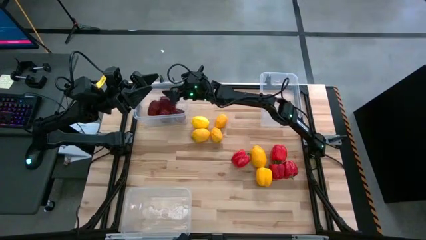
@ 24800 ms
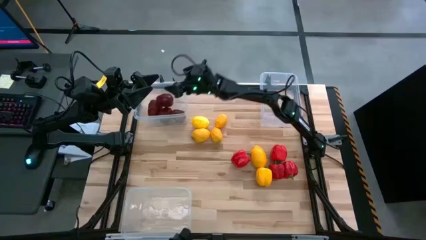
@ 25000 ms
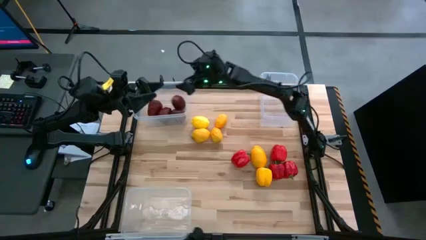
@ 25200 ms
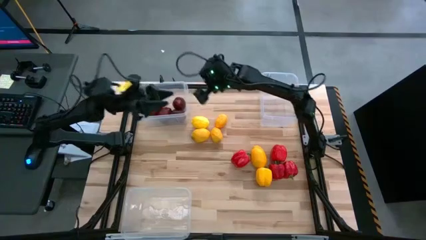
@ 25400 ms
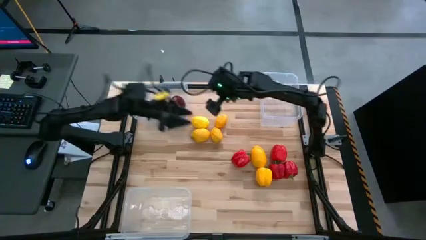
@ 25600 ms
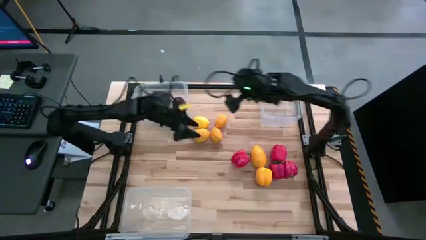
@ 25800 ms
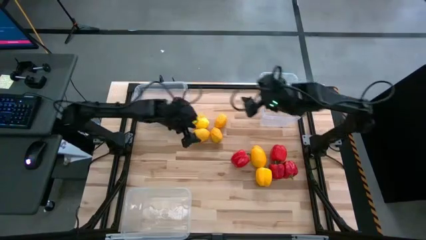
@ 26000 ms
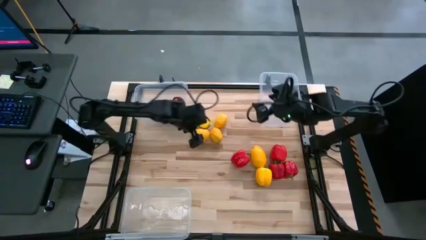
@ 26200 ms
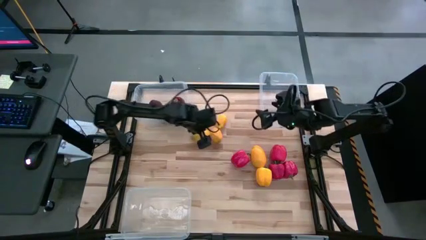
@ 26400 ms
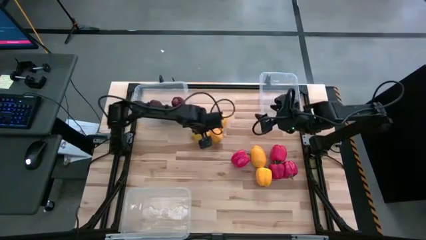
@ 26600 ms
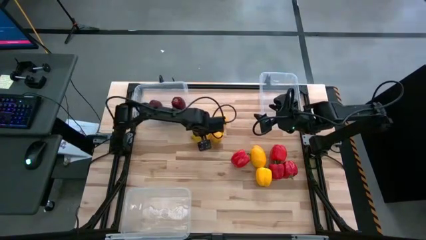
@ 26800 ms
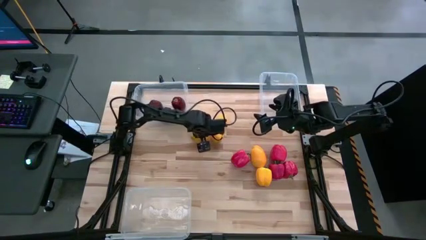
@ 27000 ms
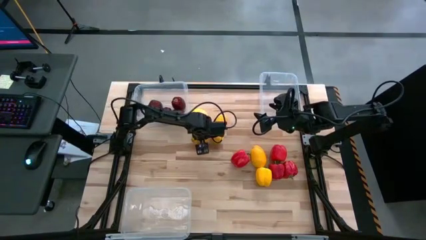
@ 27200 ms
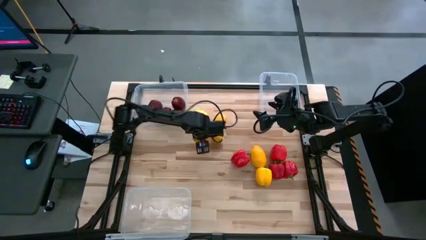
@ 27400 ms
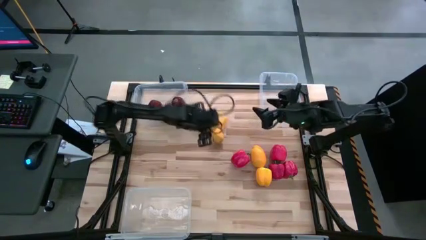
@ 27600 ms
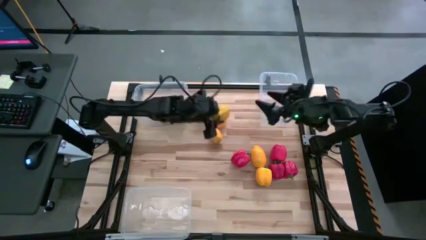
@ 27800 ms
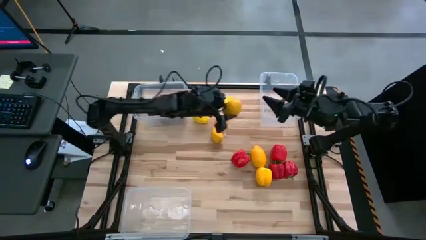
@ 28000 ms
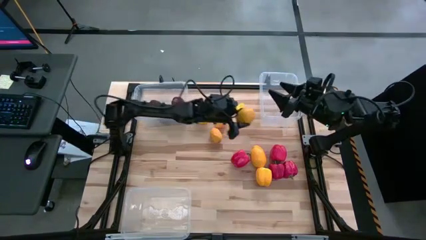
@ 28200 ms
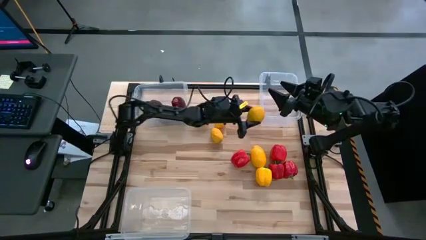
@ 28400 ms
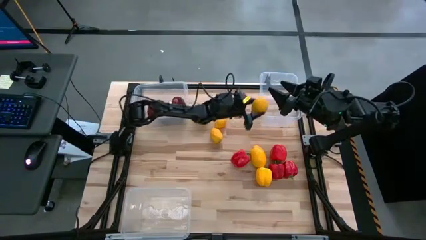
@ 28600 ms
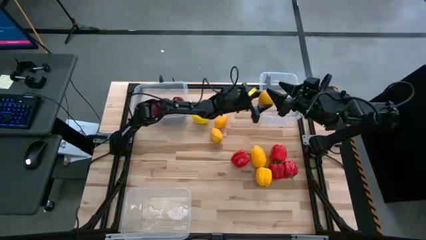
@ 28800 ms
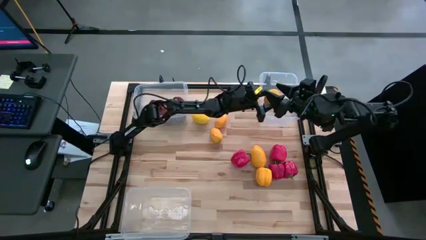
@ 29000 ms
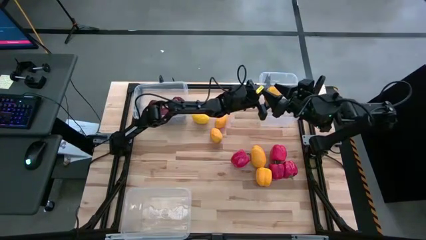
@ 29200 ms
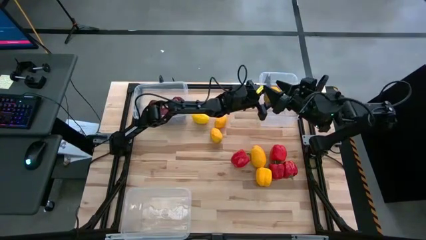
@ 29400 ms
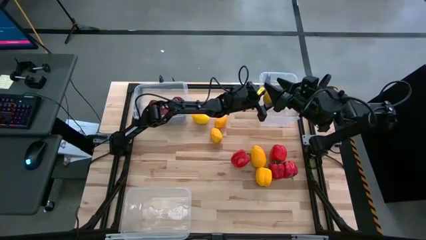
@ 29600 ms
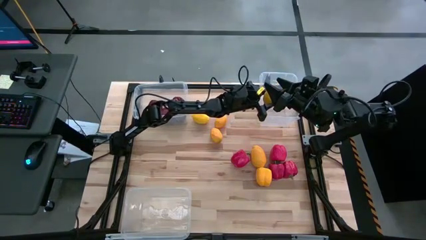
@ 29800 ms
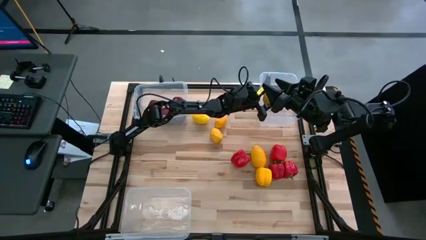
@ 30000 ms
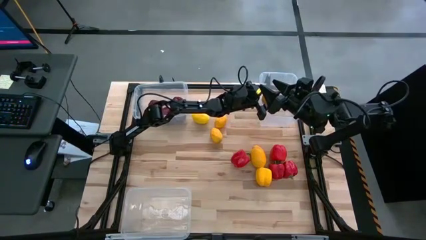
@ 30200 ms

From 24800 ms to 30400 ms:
Task: Sort produce into baskets
Put the yellow lemon into the top-right transparent bin

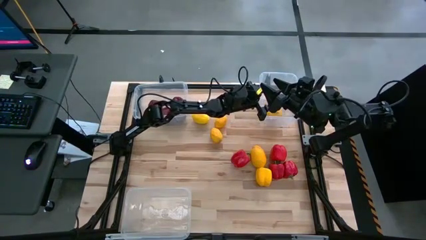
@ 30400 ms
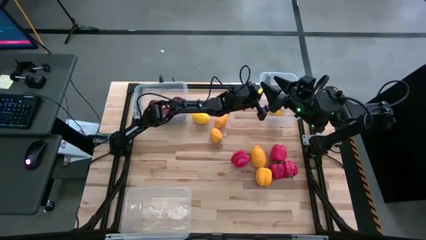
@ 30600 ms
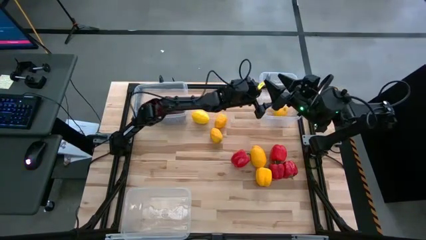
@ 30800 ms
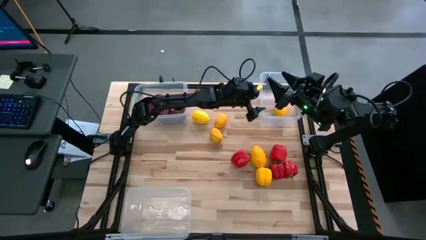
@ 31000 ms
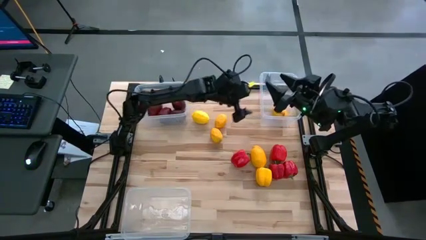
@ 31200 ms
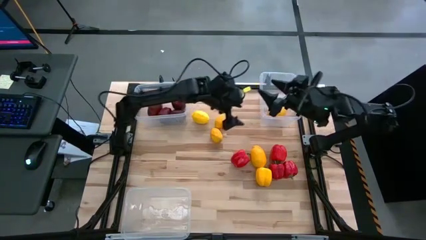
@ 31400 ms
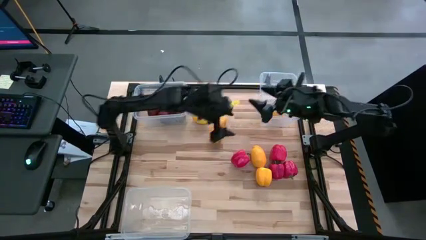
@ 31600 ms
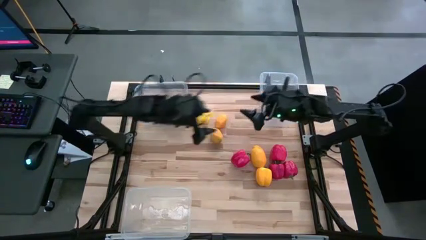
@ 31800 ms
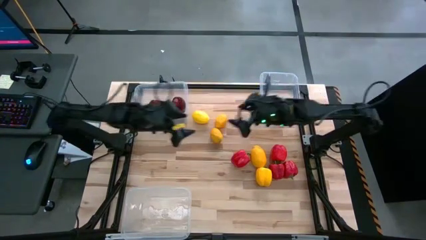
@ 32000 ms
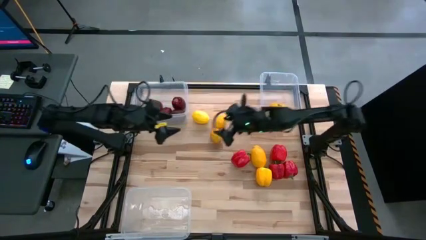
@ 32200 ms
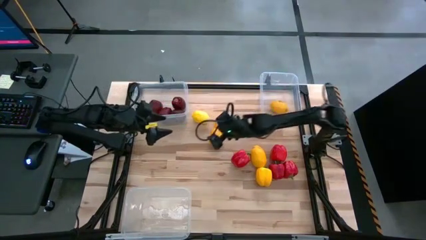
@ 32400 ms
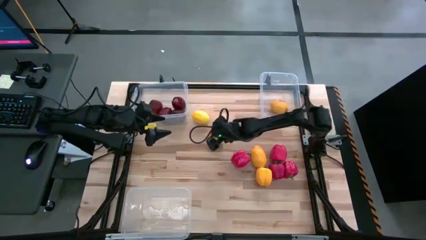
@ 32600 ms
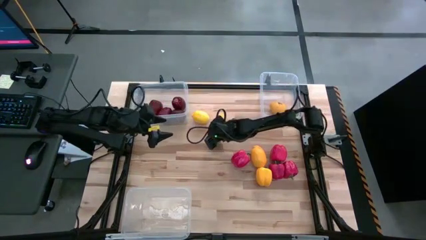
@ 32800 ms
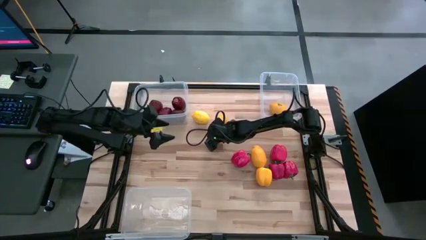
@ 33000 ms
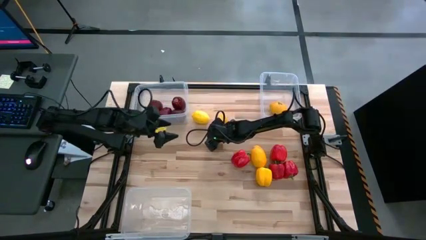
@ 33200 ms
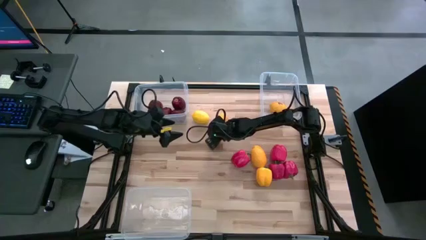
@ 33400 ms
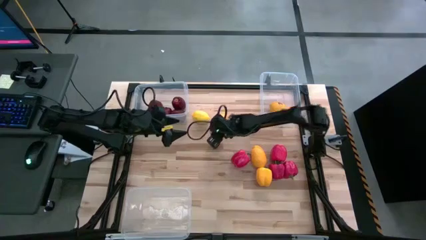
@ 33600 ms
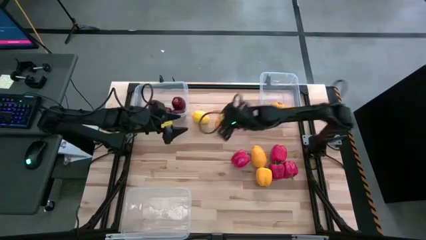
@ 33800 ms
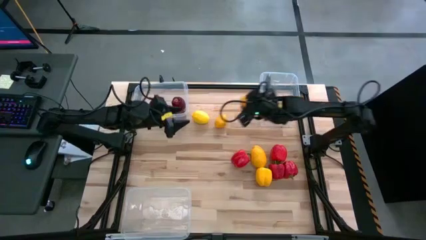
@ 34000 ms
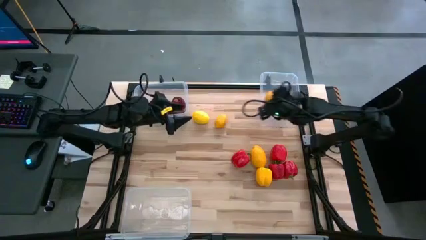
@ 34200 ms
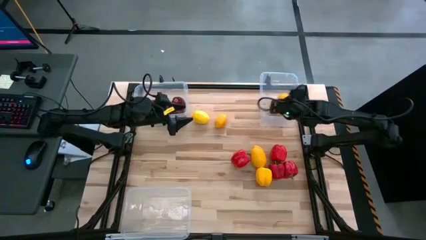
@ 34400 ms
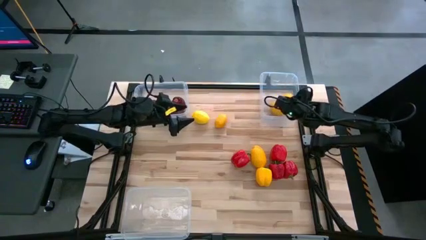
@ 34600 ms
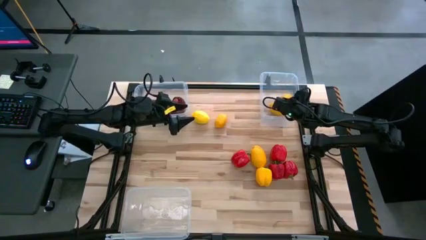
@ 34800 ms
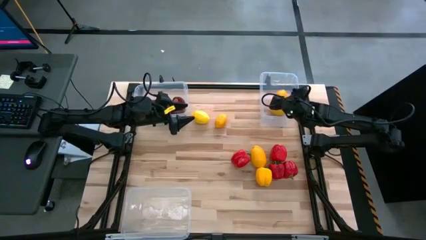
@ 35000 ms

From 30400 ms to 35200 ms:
Put the yellow lemon into the top-right transparent bin

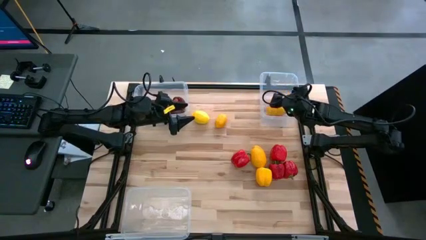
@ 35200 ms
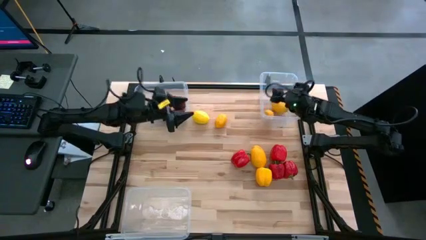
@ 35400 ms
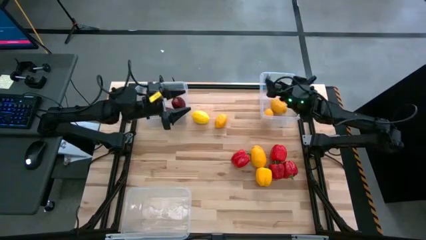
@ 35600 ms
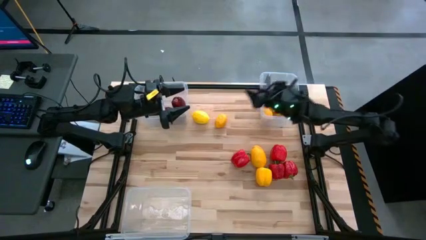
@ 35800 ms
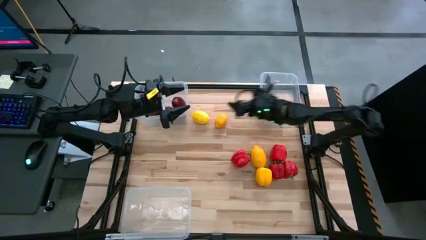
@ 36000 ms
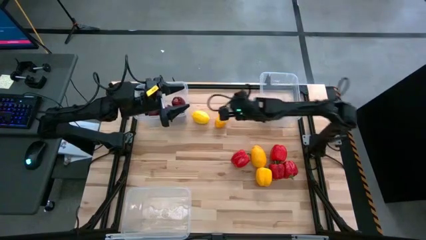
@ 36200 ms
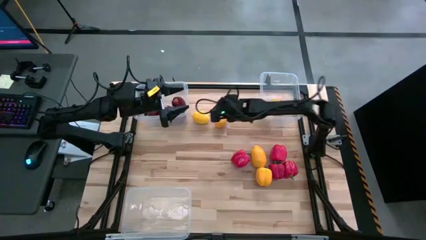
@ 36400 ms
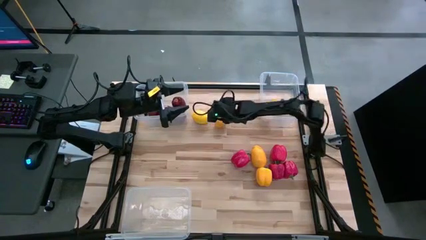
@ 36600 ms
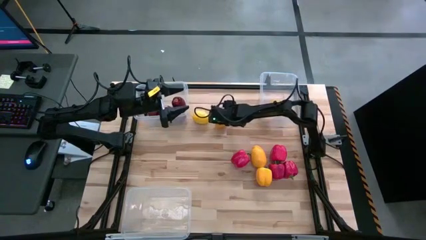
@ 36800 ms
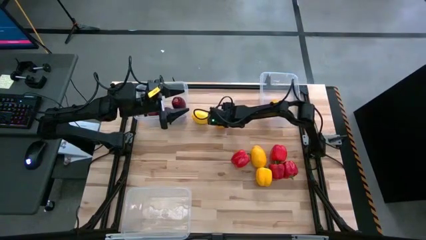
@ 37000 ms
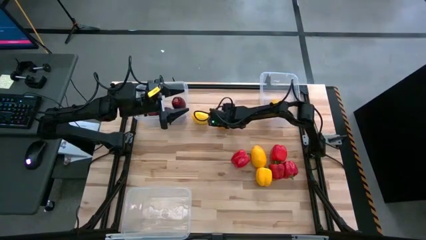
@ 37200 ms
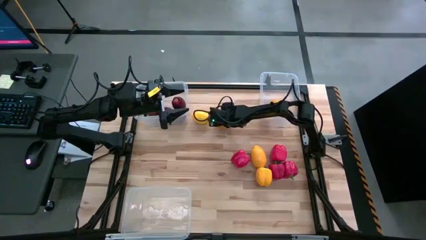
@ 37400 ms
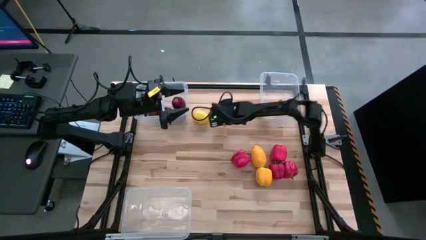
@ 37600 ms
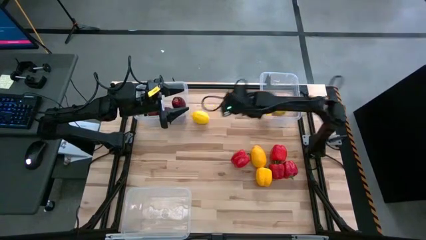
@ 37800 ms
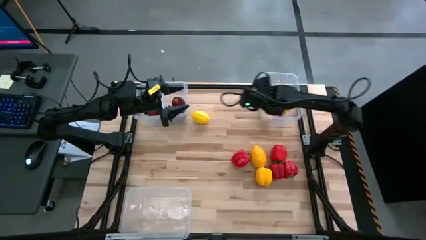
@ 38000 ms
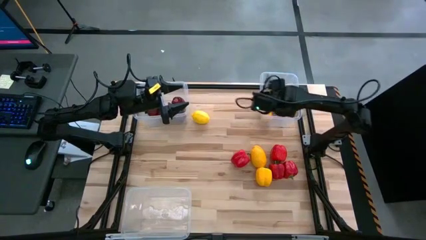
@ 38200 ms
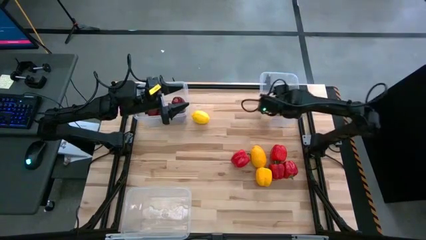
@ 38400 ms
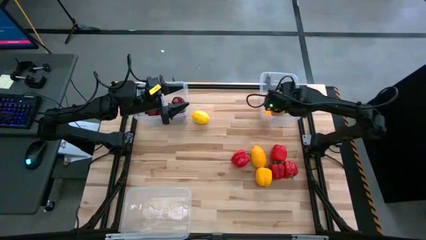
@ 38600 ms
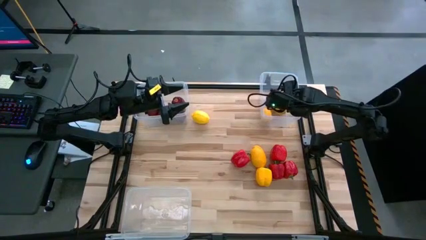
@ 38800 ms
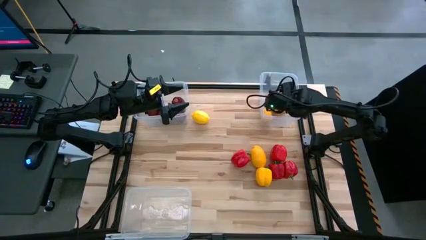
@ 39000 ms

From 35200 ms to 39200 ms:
Put the yellow lemon into the top-right transparent bin

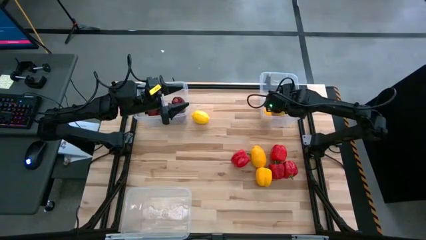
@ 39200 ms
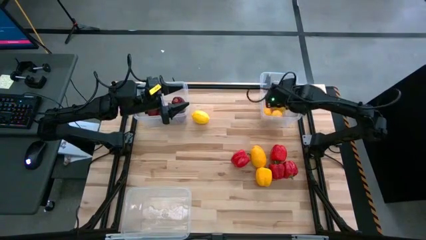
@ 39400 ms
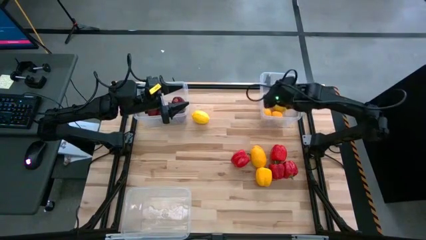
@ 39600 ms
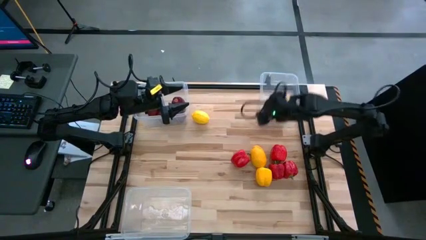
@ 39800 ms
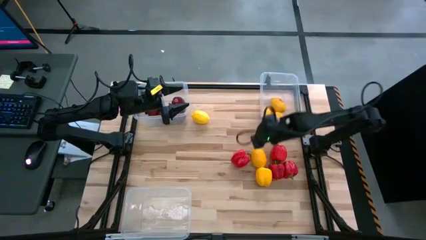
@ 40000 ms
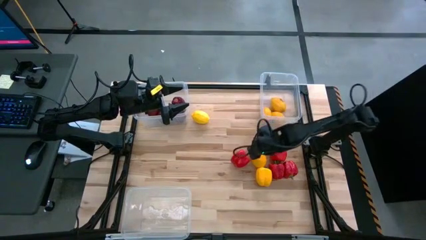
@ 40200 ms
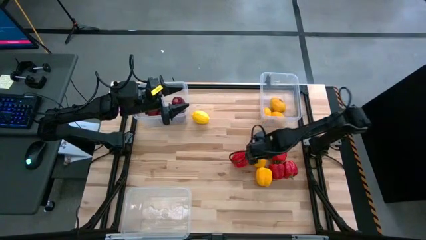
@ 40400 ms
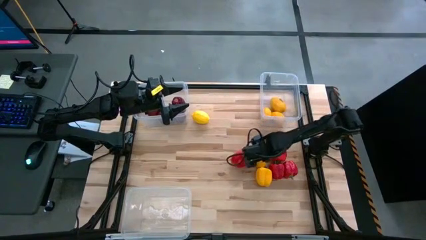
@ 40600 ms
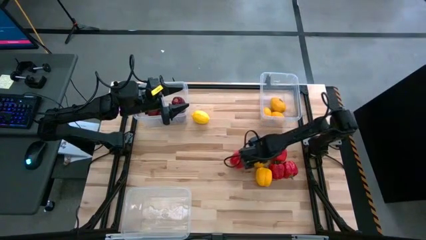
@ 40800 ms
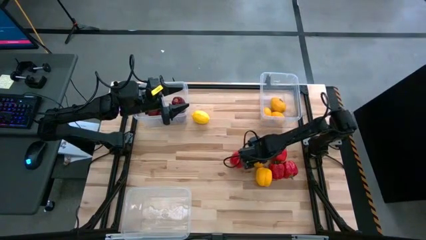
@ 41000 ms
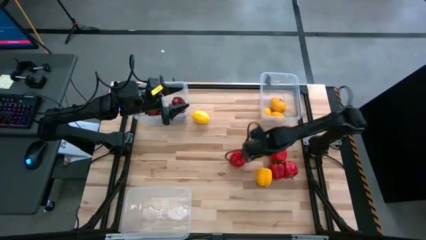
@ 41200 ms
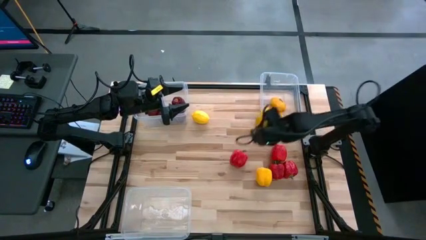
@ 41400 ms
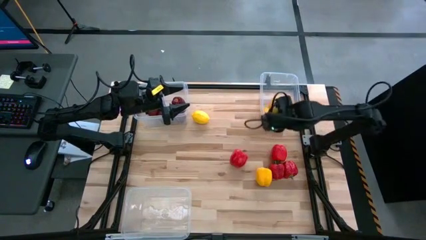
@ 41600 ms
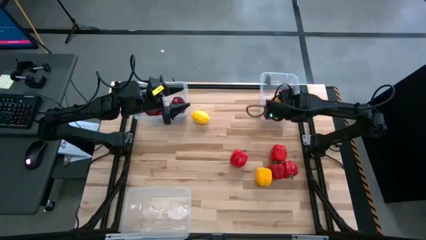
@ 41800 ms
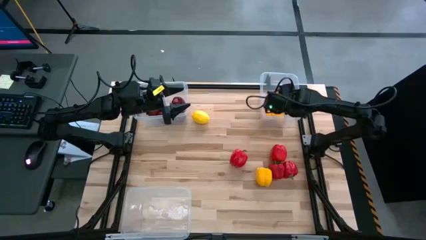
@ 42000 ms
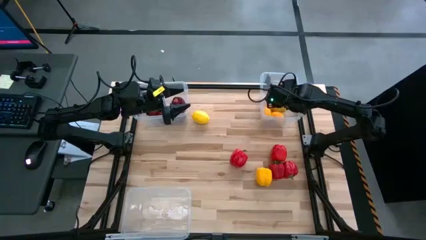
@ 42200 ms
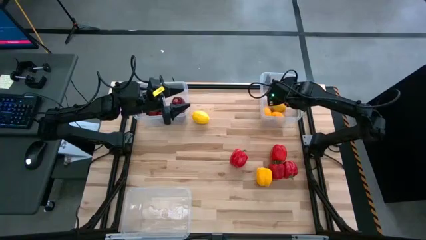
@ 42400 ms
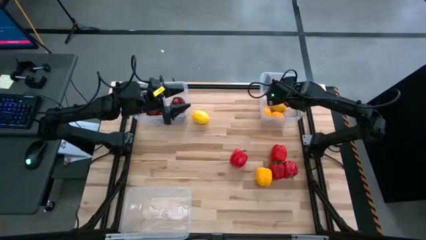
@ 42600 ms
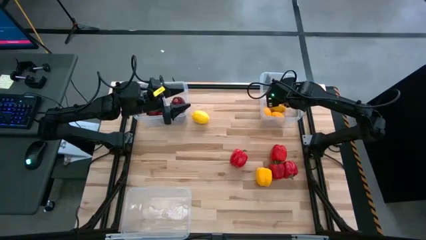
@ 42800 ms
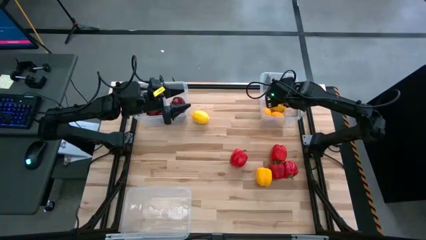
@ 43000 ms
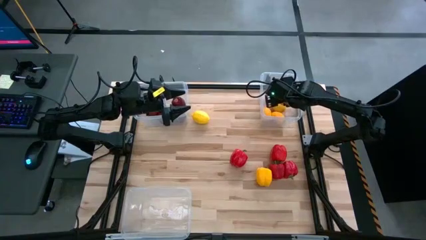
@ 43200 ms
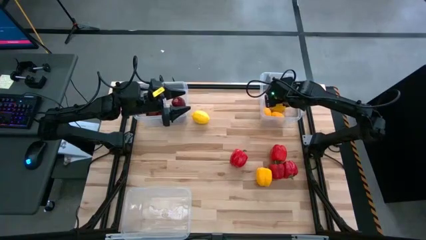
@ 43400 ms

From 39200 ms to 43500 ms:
Put the yellow lemon into the top-right transparent bin
